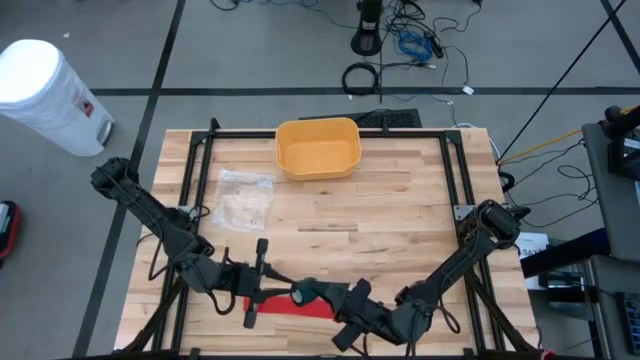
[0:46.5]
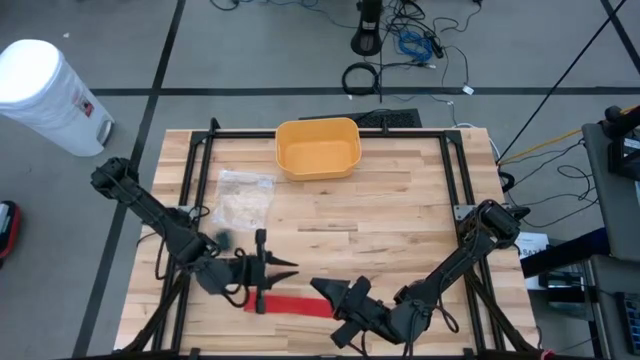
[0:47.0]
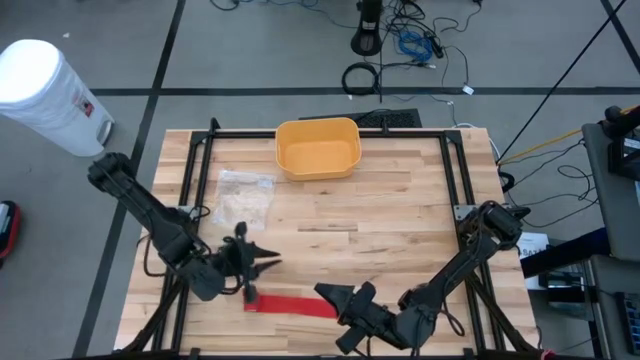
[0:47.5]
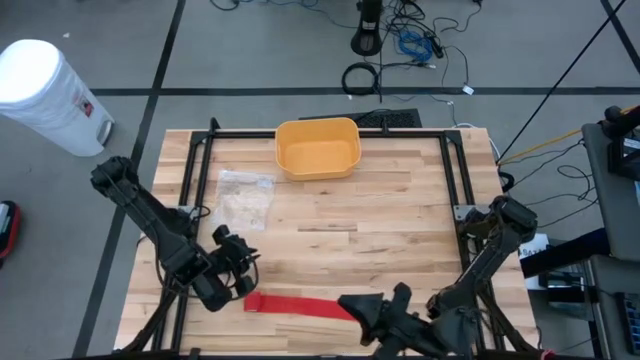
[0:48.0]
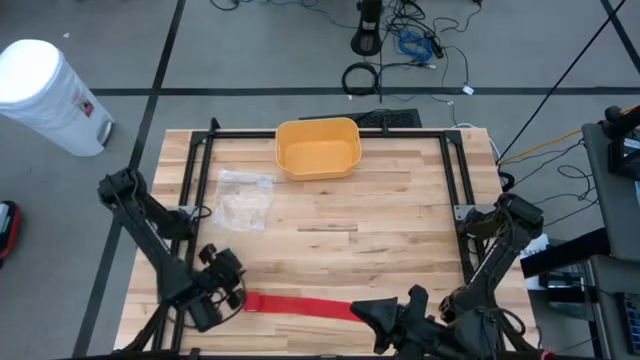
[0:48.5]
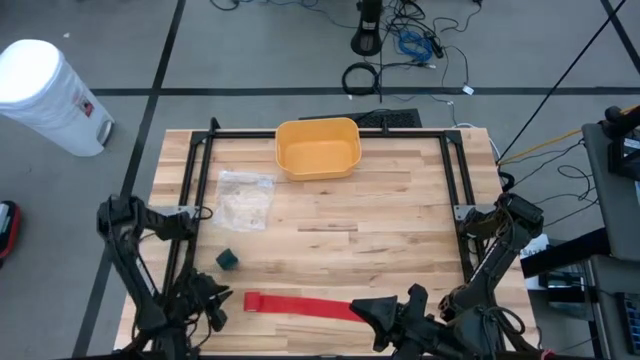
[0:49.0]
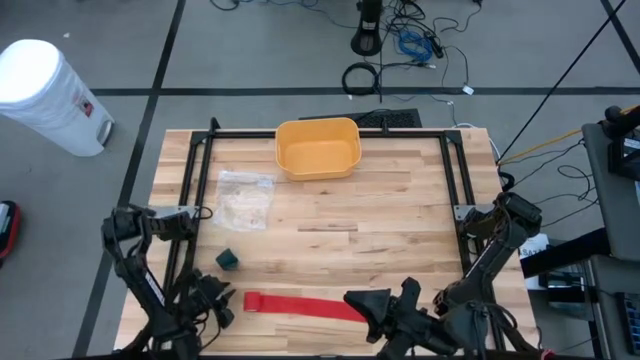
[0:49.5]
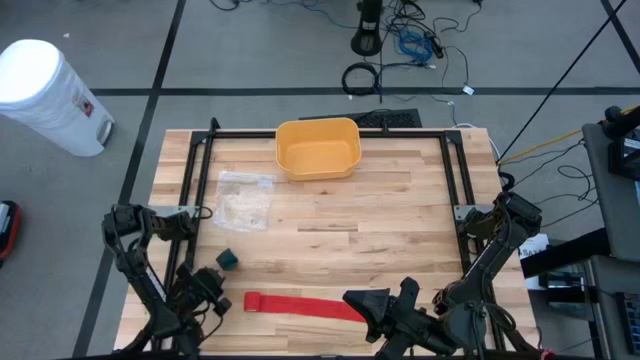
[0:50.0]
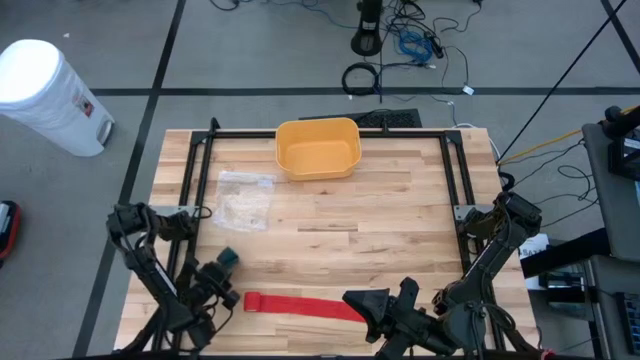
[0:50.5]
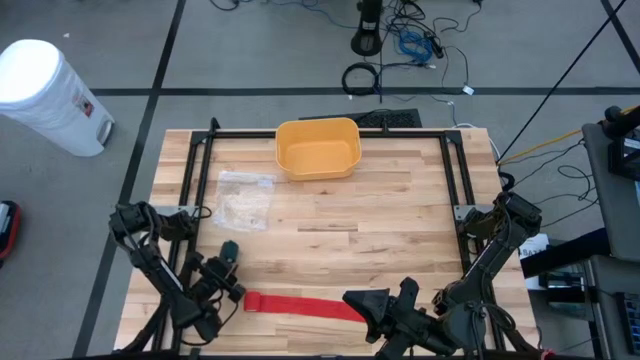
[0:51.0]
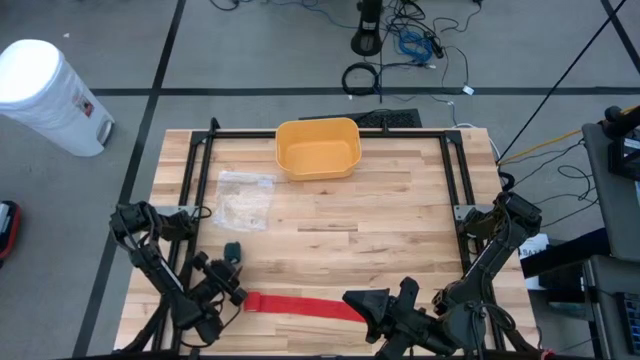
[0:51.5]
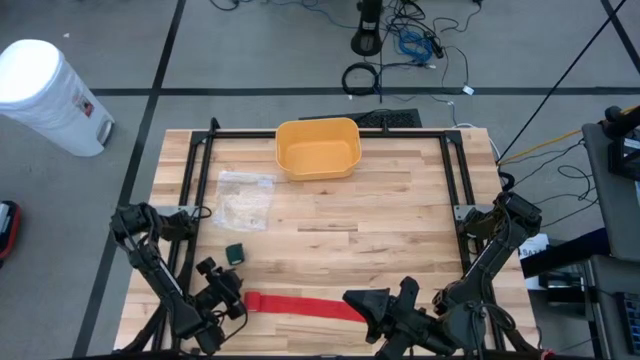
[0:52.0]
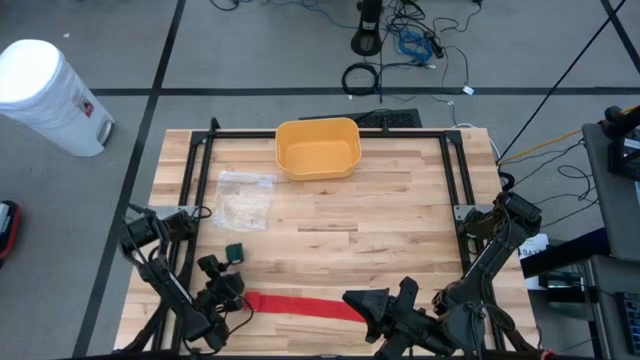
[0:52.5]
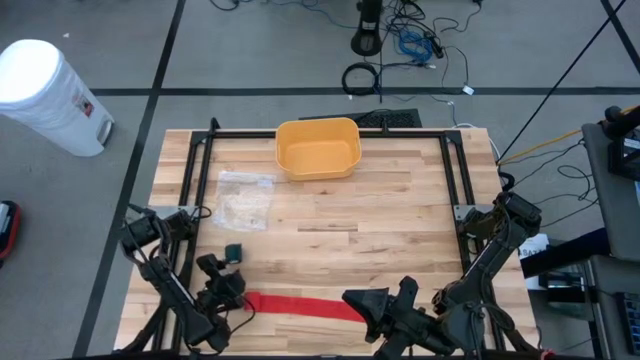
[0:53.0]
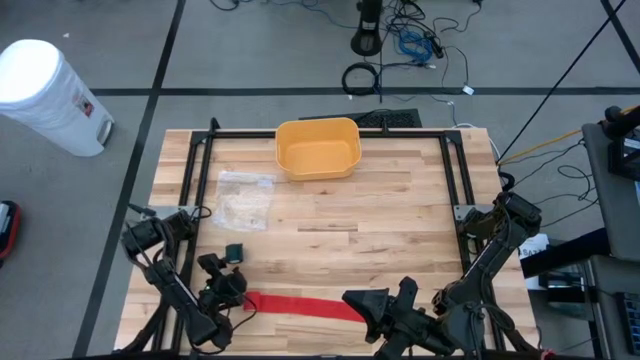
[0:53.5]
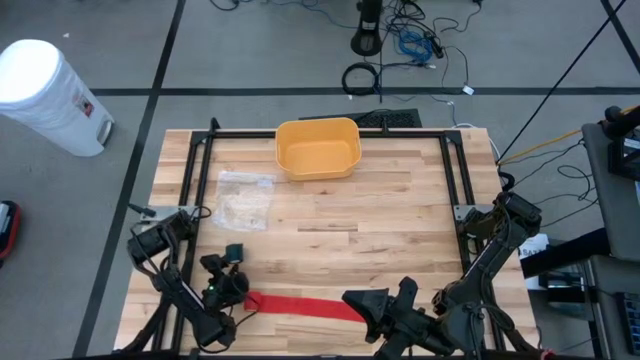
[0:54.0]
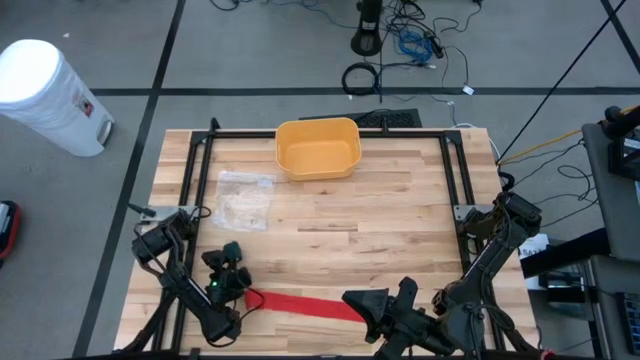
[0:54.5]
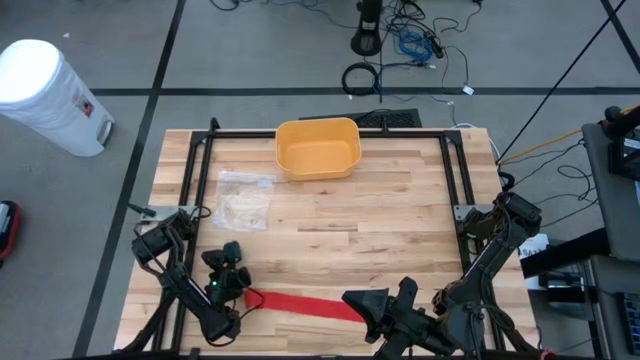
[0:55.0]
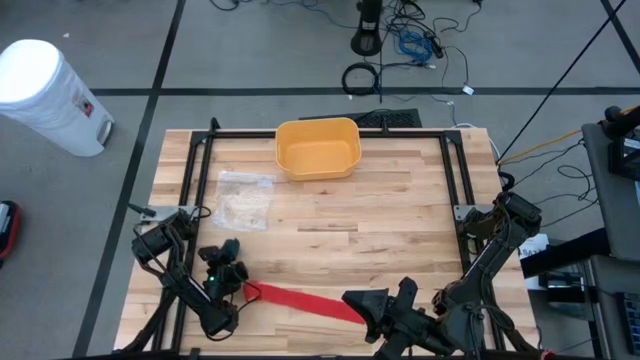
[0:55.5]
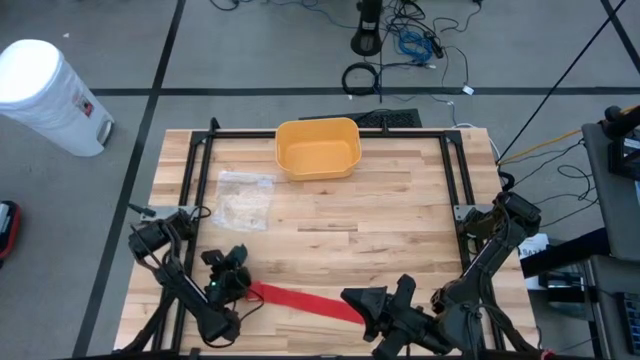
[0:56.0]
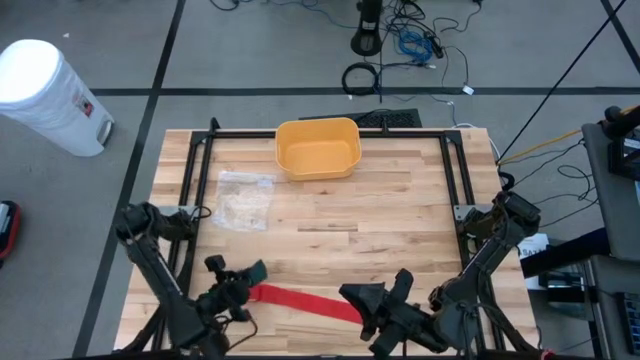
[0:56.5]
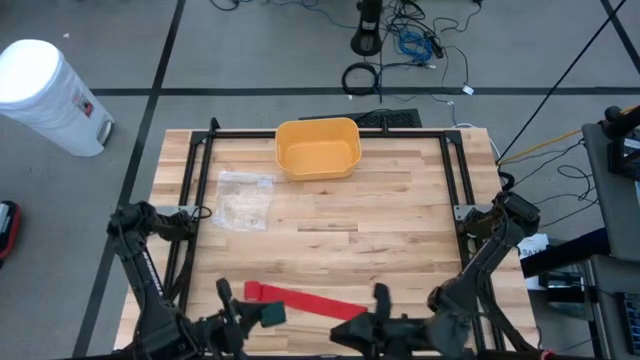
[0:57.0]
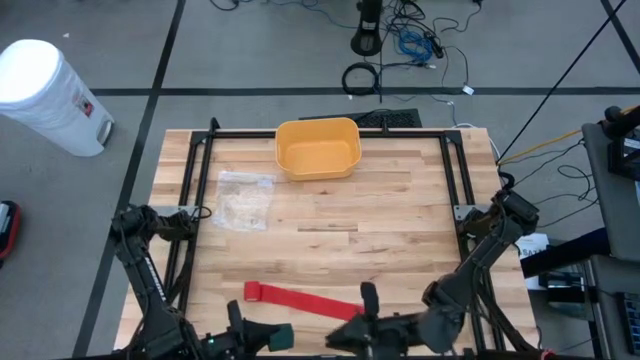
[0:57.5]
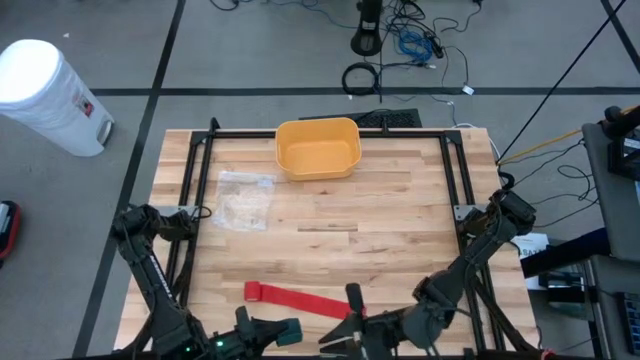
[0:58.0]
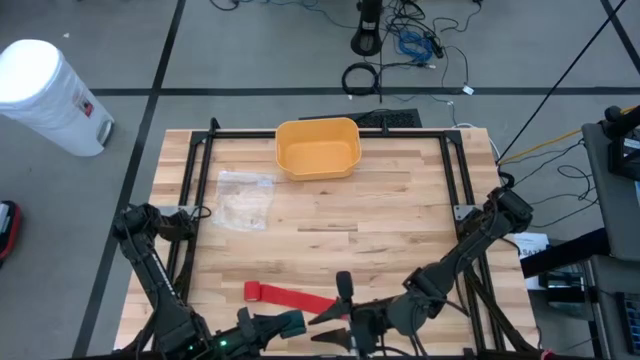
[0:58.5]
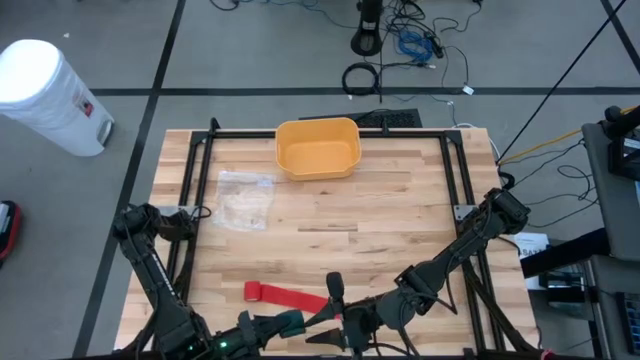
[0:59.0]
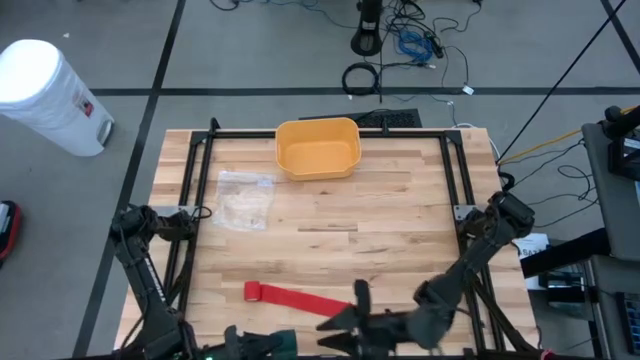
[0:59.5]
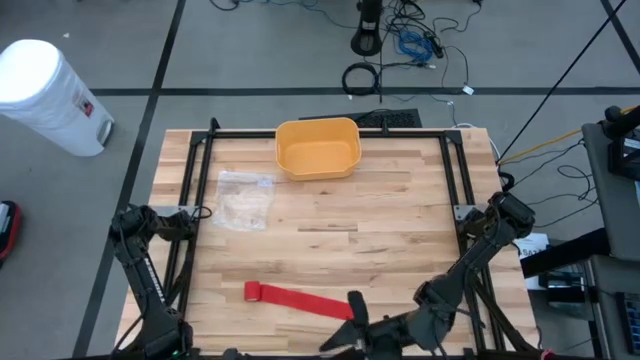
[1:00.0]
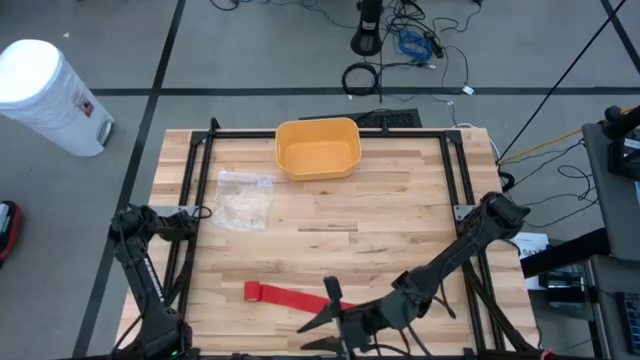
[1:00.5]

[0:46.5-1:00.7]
Task: Roll bandage
Roll the green bandage

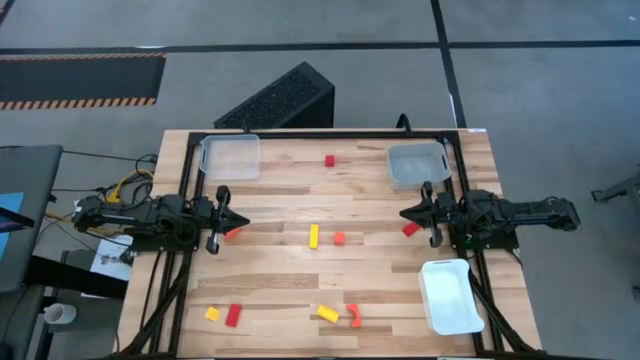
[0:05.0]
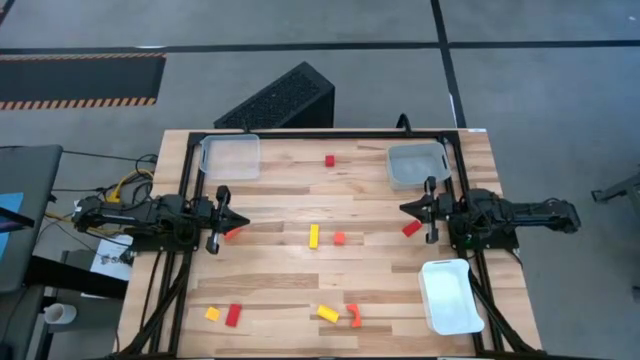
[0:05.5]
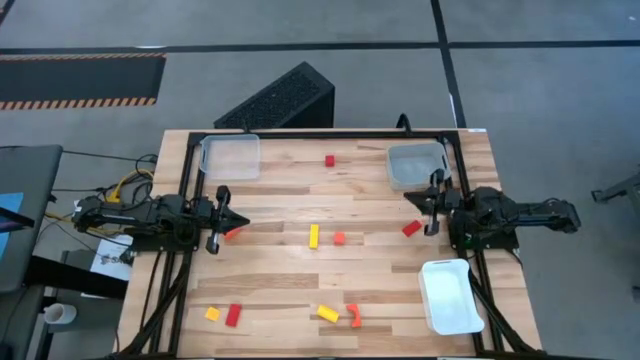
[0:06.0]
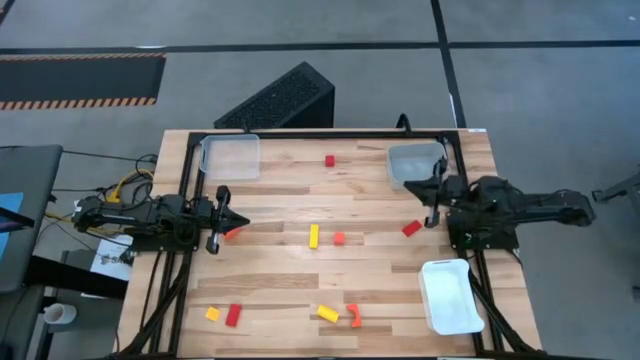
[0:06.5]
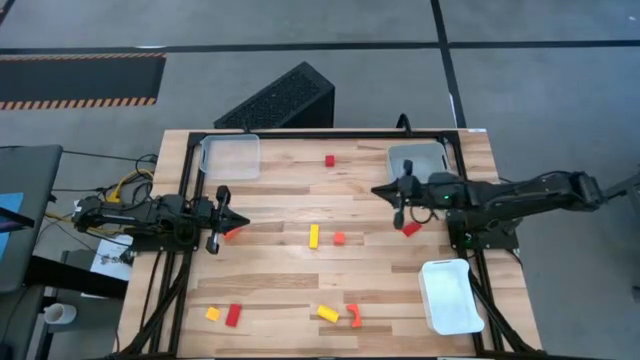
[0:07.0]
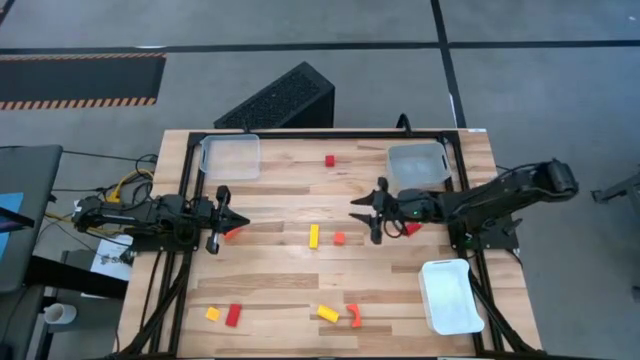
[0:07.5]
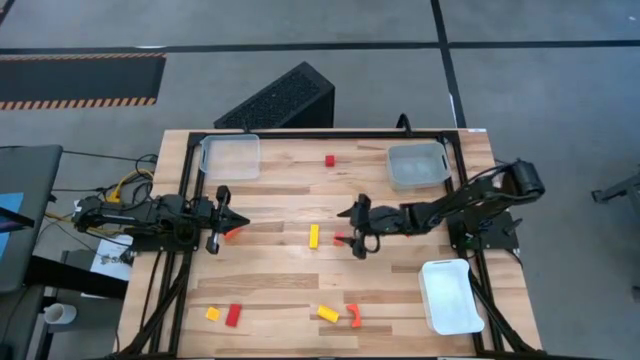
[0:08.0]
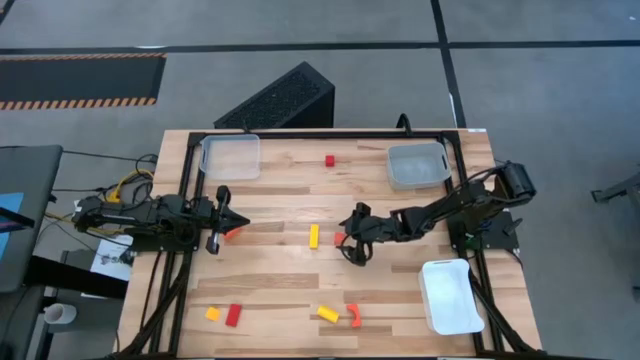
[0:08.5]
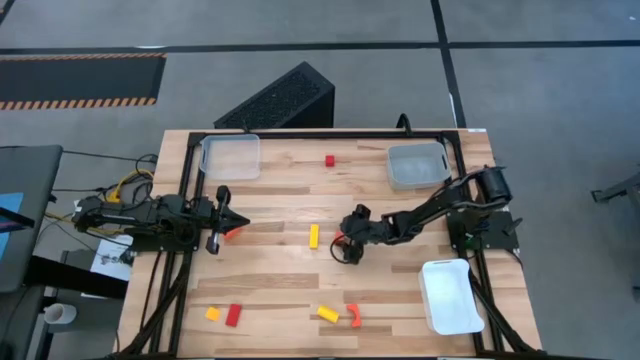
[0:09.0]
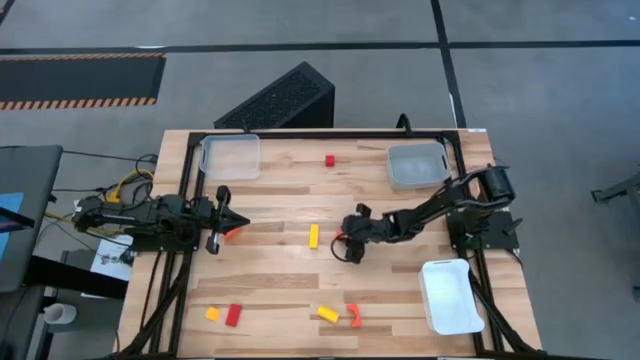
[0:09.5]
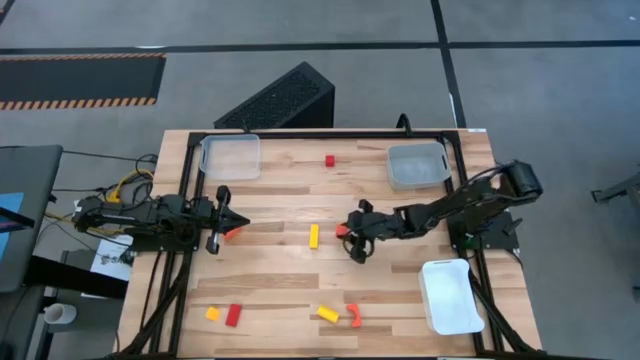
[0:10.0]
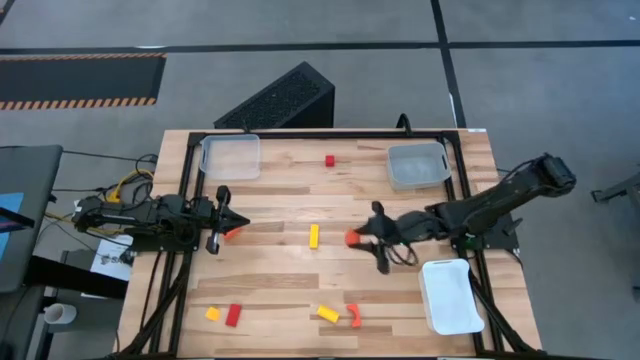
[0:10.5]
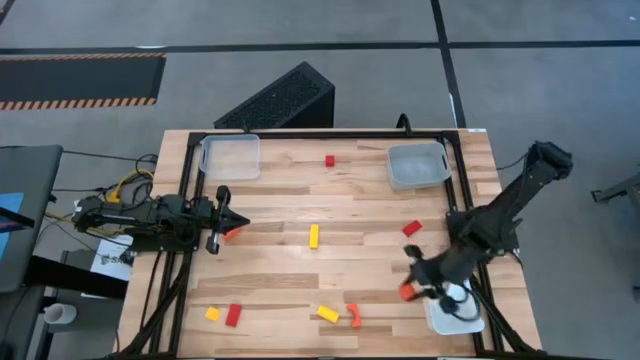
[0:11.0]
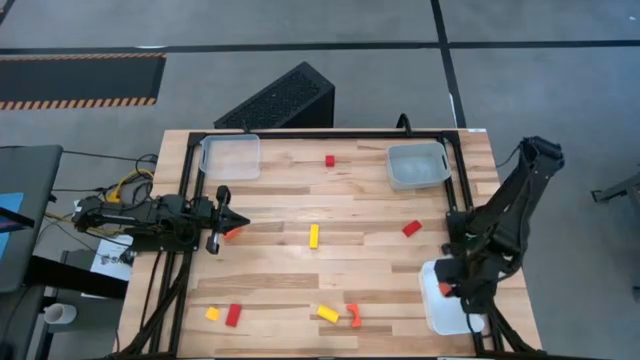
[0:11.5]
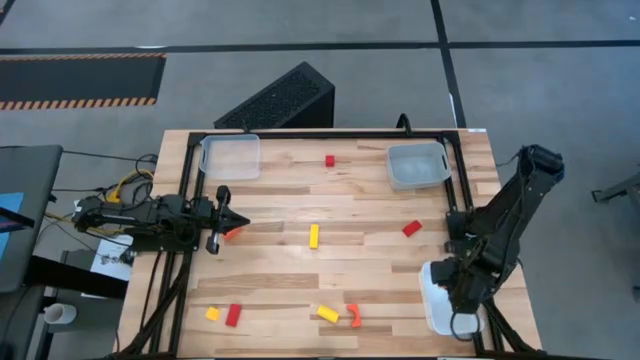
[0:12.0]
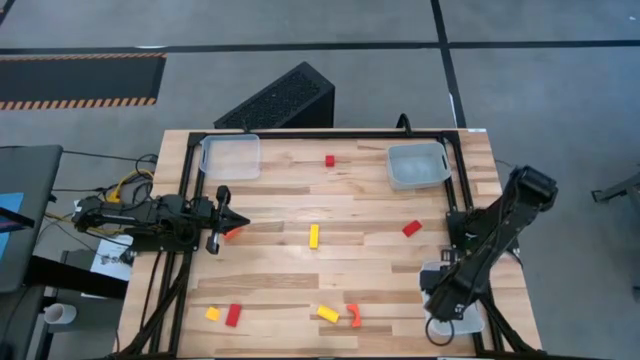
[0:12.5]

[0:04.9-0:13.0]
Task: Sort & place blocks by color
Put the top right orange block into the white bin
